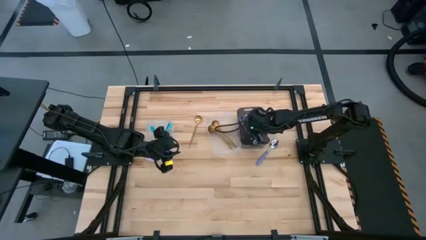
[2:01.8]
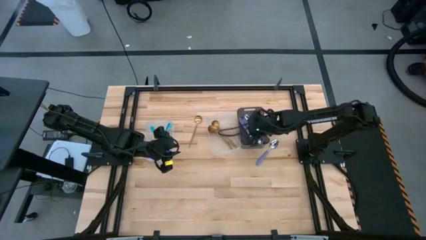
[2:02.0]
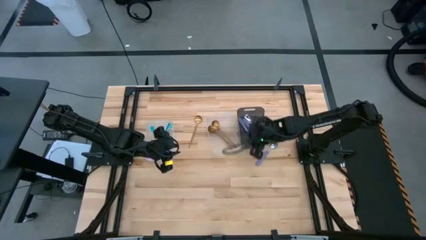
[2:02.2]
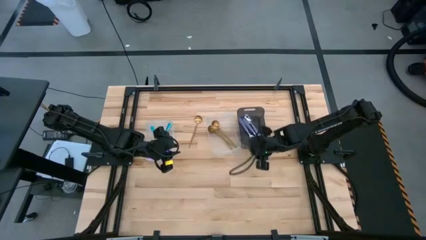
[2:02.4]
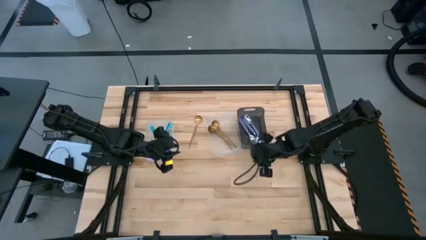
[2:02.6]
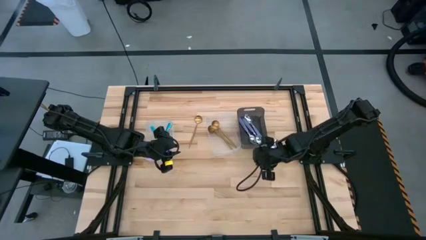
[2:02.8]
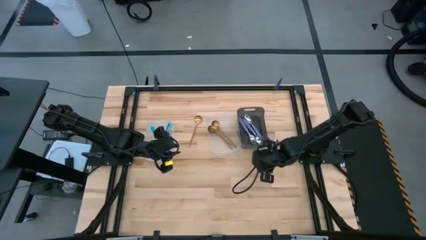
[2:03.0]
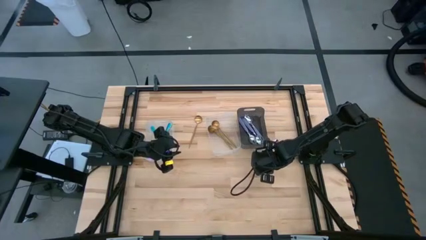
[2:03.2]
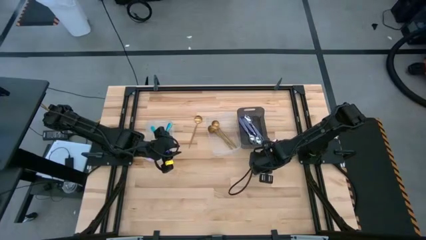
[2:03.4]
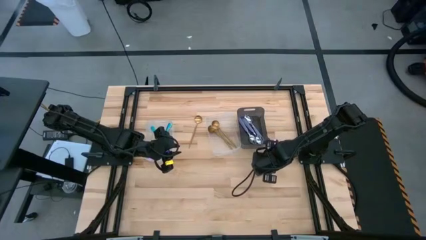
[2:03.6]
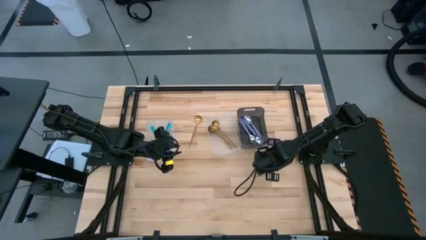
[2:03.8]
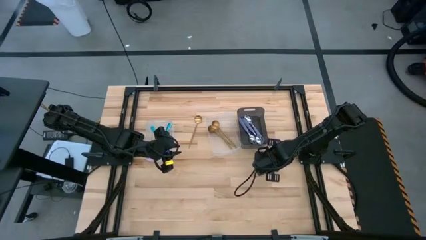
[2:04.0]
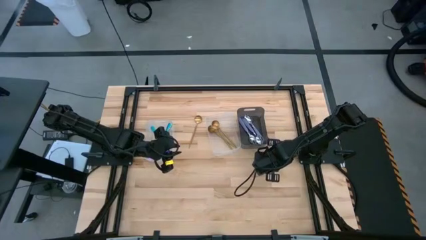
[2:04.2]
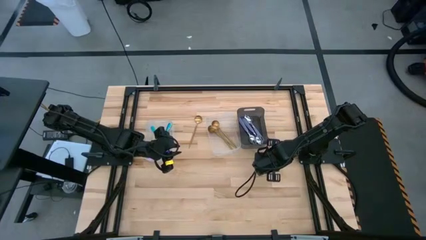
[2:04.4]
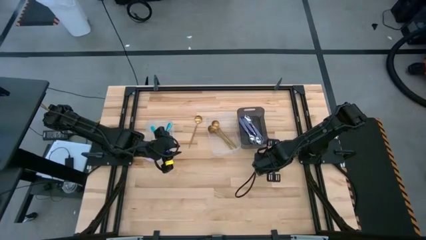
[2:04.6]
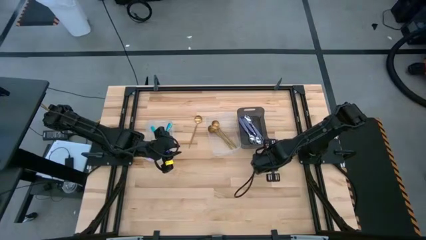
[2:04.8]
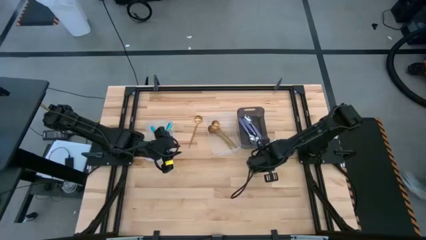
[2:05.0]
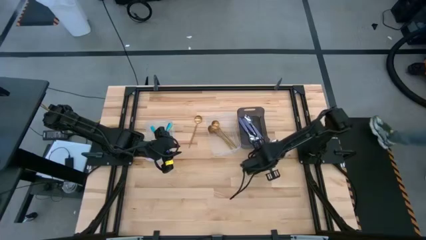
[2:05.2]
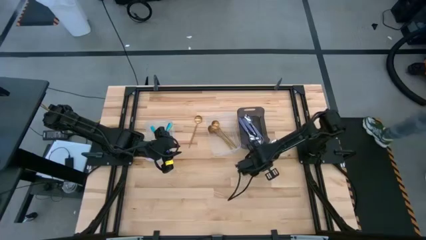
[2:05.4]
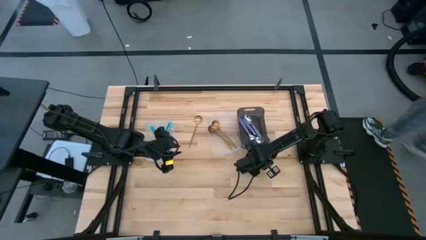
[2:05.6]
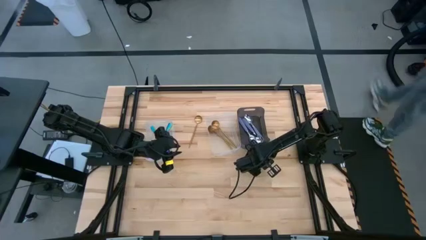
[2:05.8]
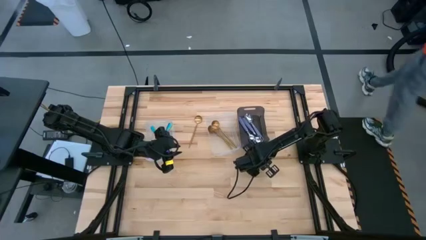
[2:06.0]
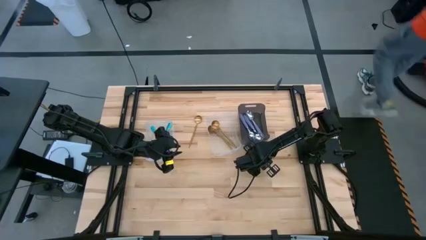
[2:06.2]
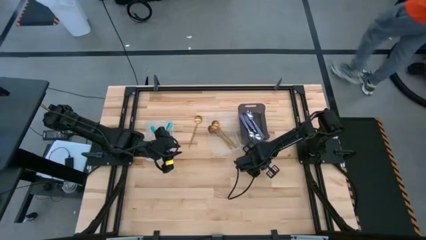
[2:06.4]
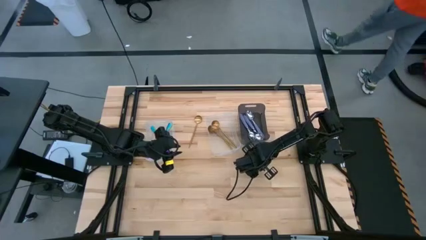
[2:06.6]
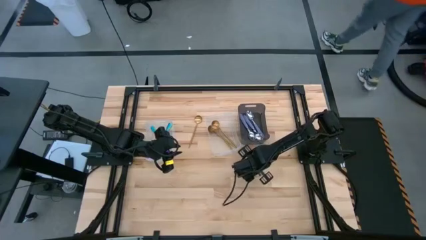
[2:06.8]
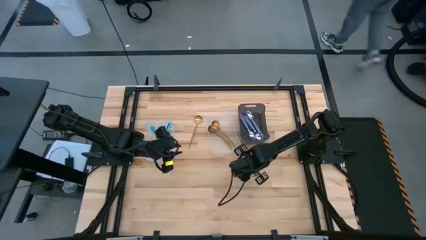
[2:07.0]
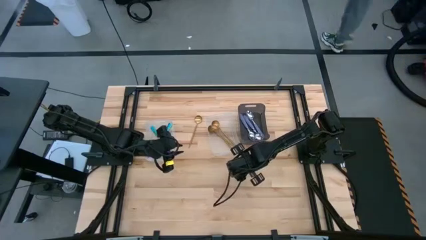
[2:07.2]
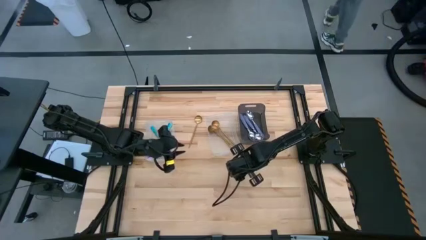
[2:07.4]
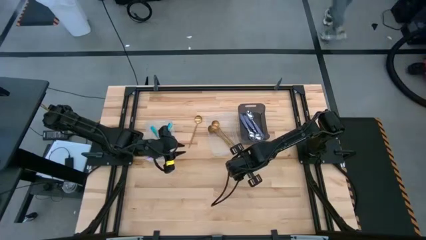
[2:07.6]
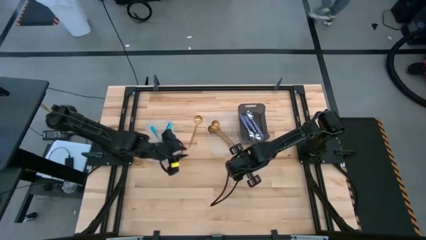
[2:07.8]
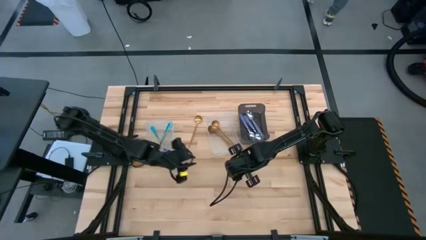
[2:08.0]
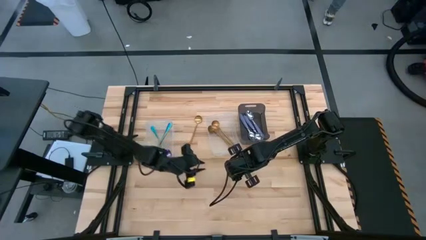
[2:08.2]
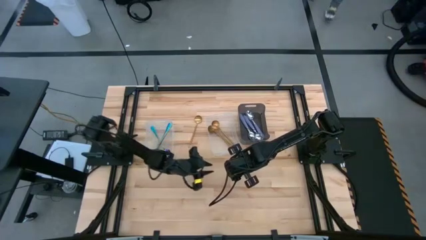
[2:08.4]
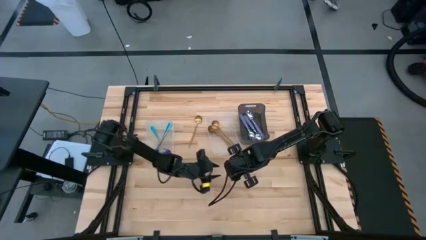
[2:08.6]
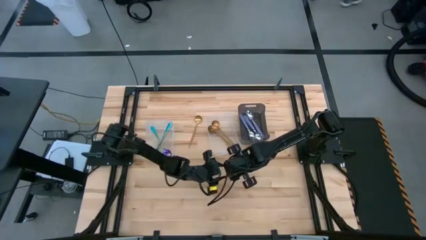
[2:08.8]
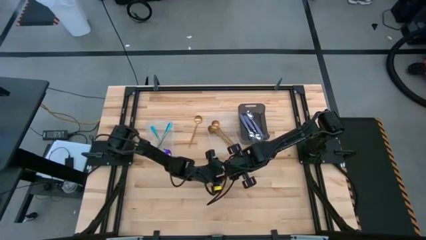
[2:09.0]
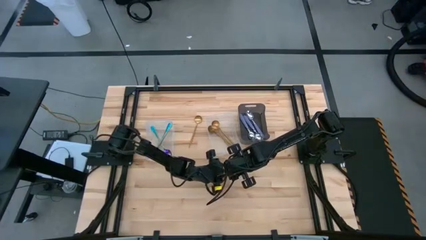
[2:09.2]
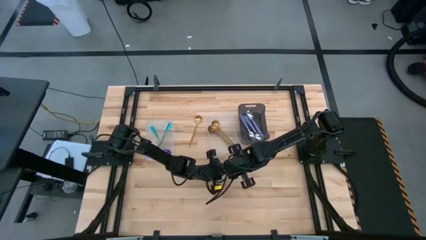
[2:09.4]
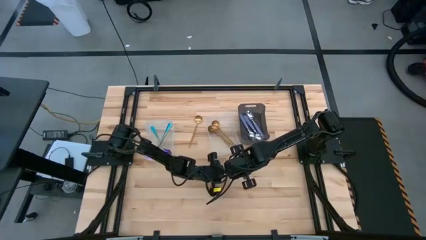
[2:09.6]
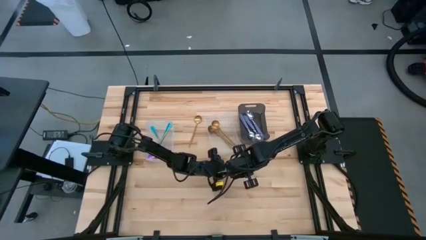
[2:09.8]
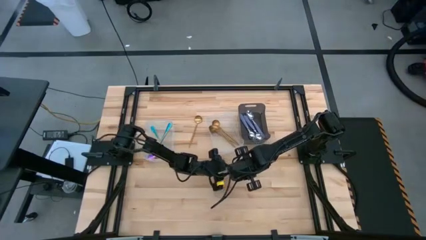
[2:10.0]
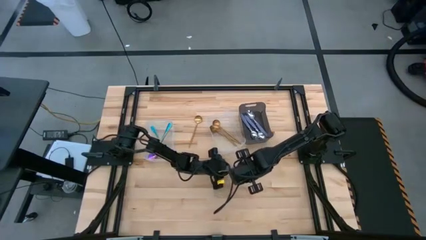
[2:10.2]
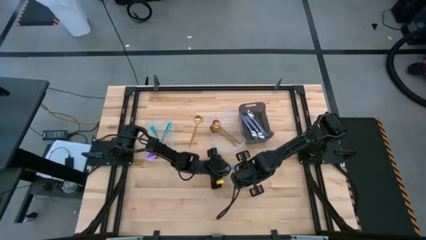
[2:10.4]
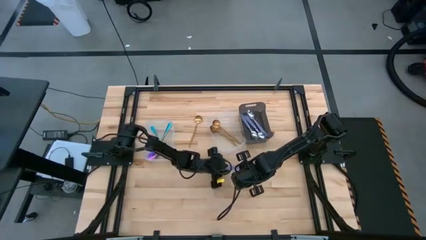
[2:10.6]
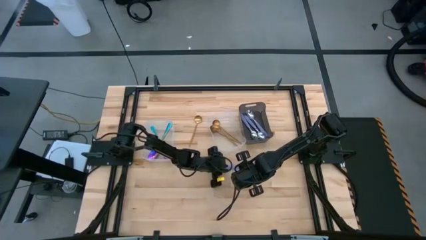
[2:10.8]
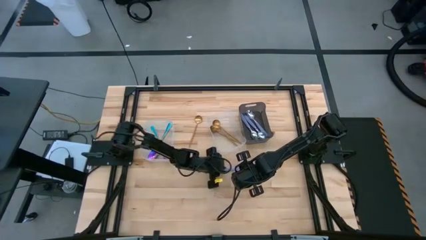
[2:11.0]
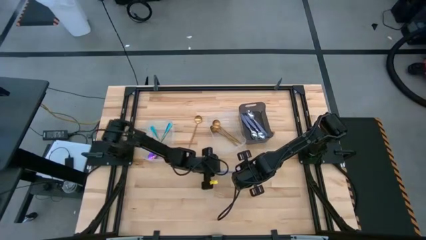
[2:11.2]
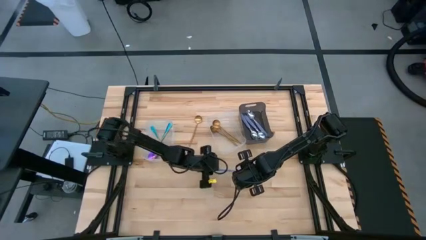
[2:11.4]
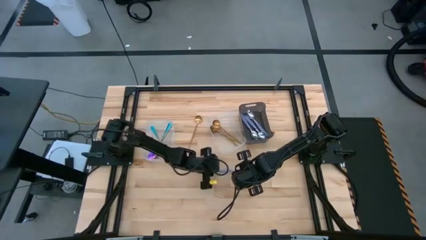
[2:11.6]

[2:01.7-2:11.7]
Task: Sort silverware by color (type)
Put the purple spoon into the black bin

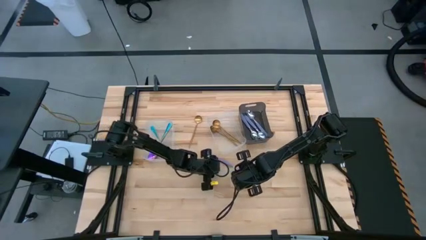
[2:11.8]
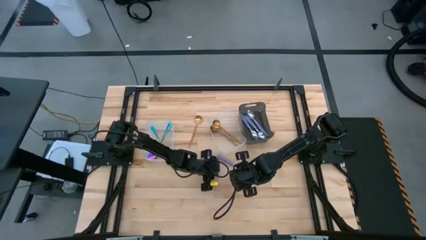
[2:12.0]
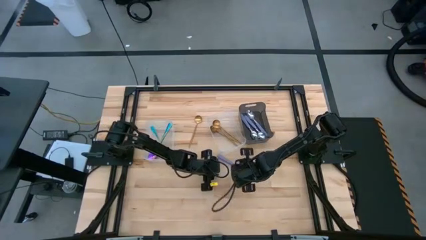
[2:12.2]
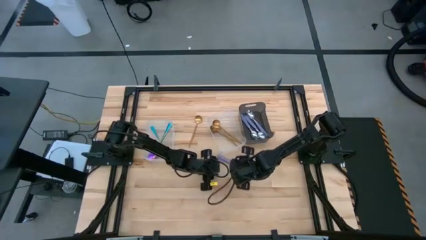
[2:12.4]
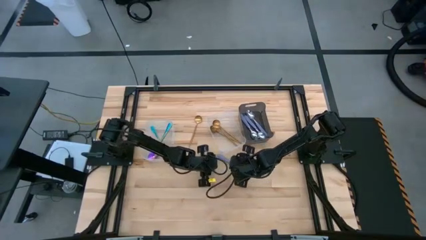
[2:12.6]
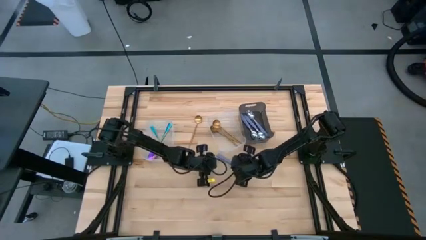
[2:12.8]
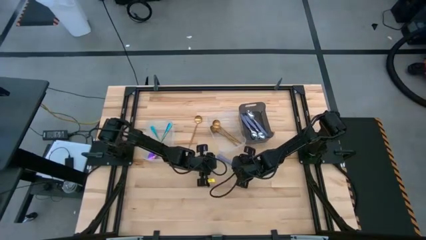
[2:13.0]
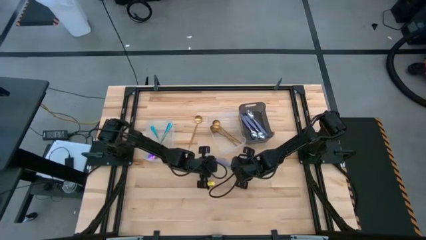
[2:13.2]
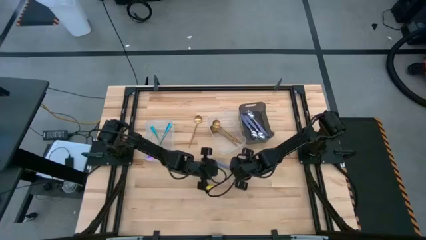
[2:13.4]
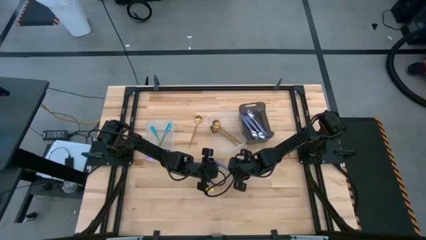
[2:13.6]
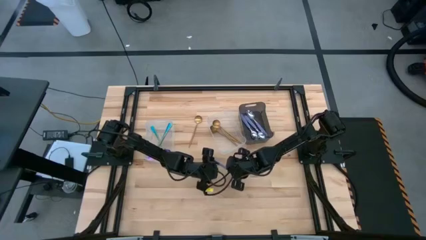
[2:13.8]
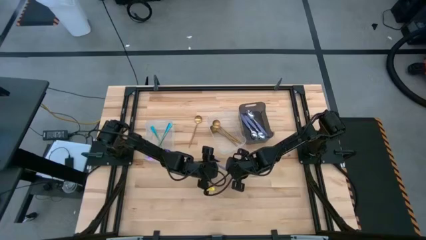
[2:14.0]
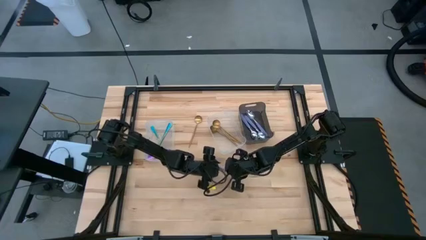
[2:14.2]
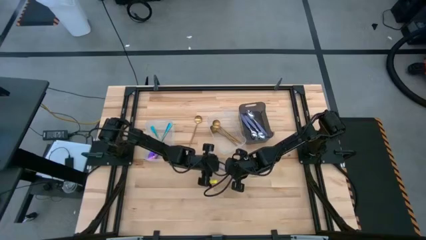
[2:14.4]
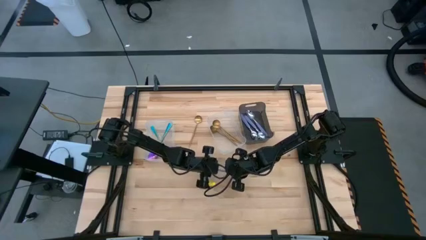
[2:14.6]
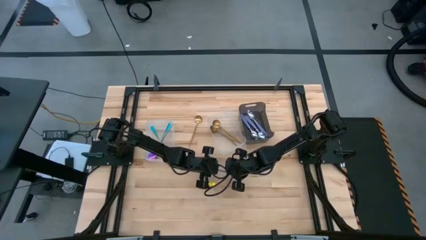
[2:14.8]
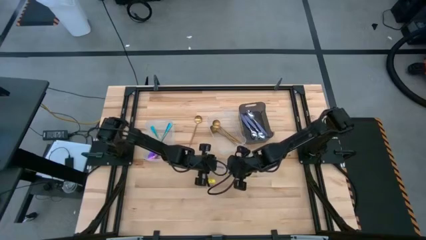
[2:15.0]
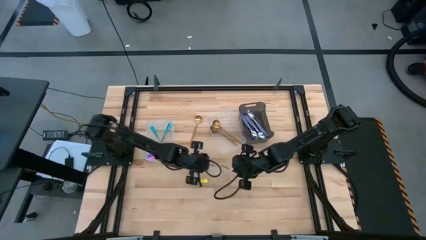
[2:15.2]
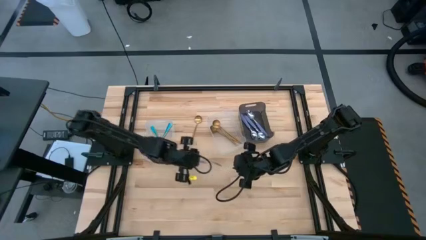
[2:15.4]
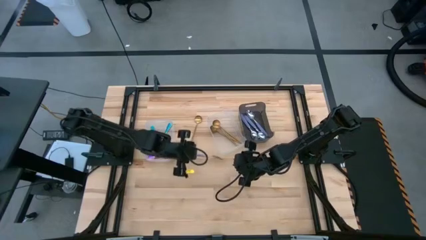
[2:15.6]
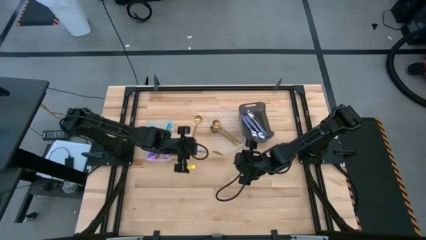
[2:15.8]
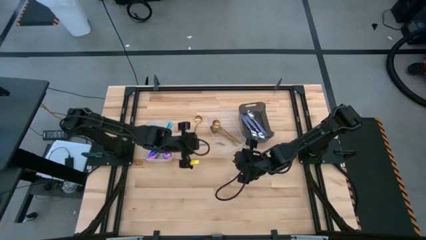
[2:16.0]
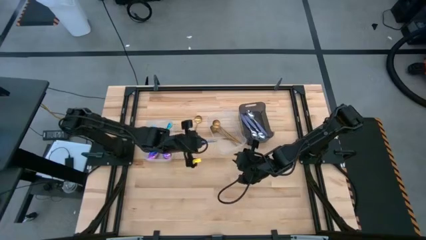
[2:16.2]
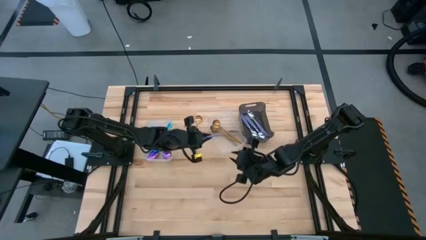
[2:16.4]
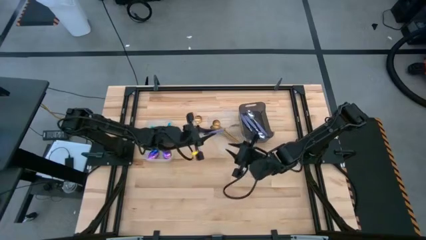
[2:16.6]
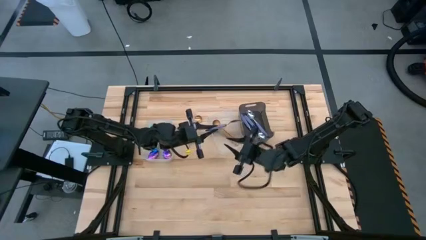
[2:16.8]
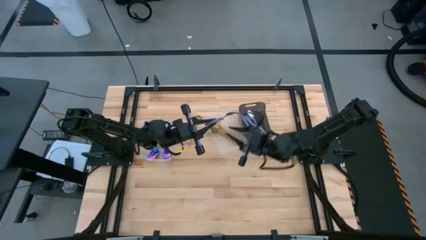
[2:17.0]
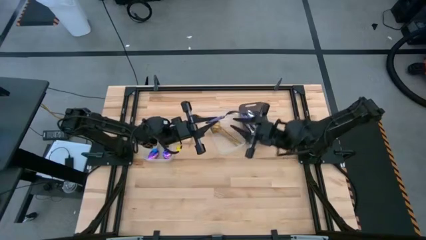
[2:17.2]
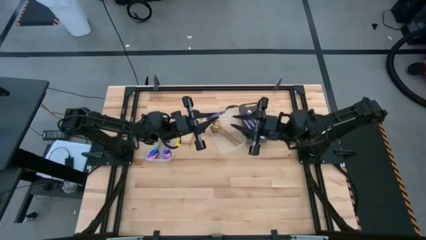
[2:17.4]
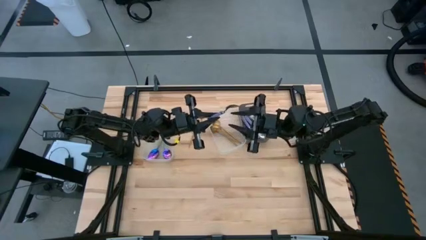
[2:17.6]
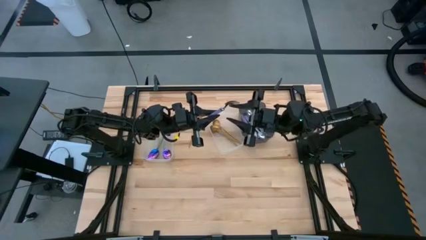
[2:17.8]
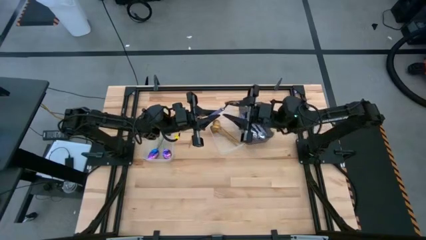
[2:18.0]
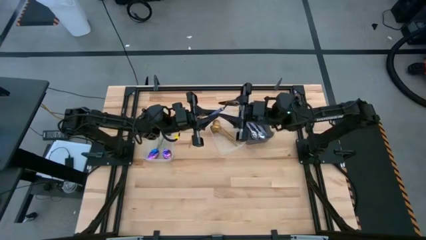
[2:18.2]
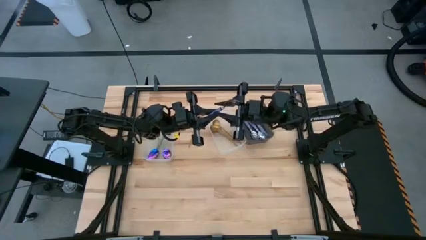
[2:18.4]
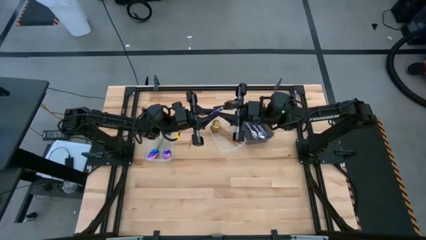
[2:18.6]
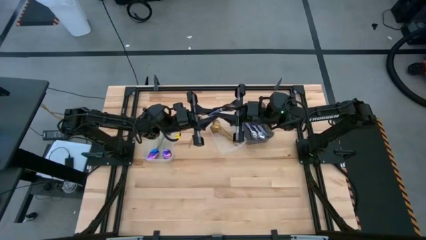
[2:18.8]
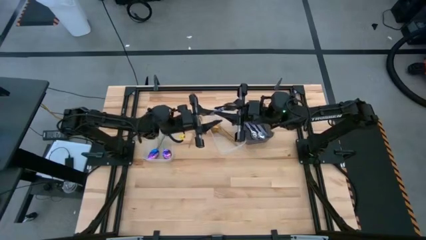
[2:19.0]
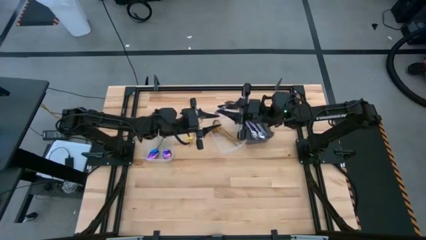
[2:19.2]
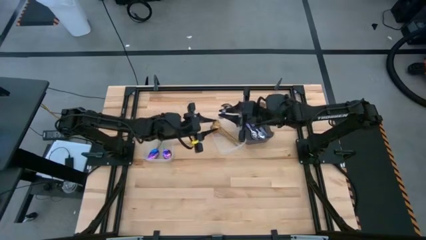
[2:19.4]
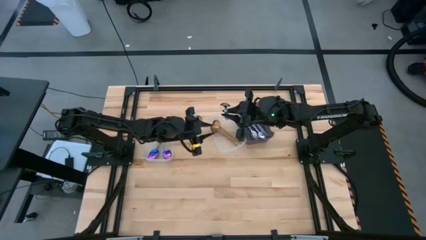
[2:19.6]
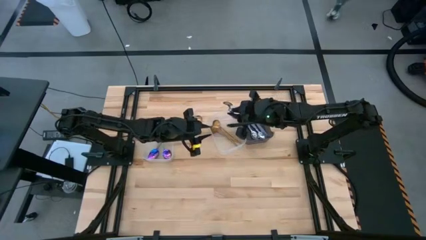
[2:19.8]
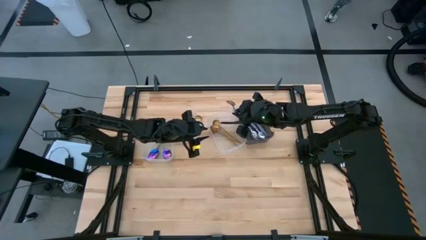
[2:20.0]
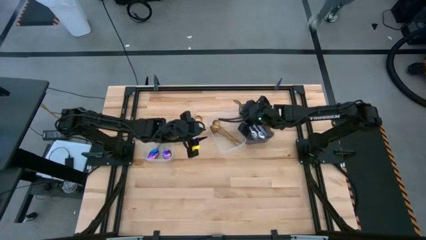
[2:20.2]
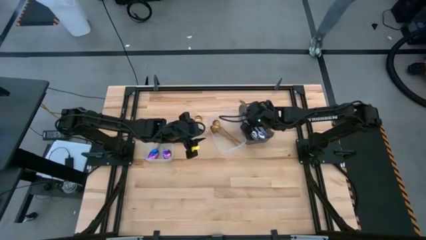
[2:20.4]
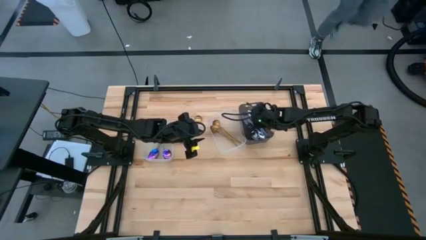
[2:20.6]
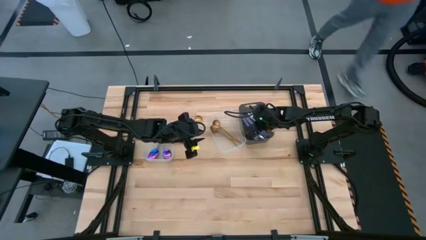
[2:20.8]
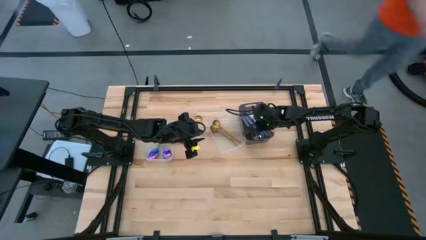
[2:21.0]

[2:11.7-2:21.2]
Put the purple spoon into the black bin
